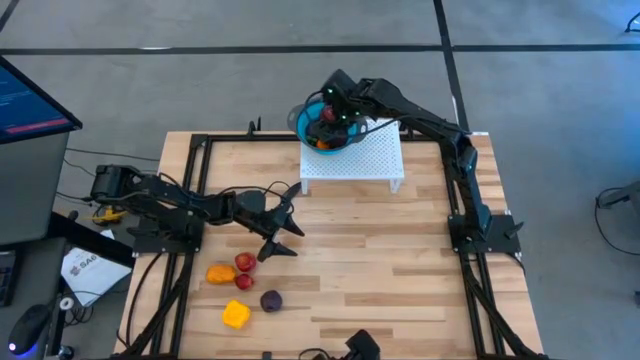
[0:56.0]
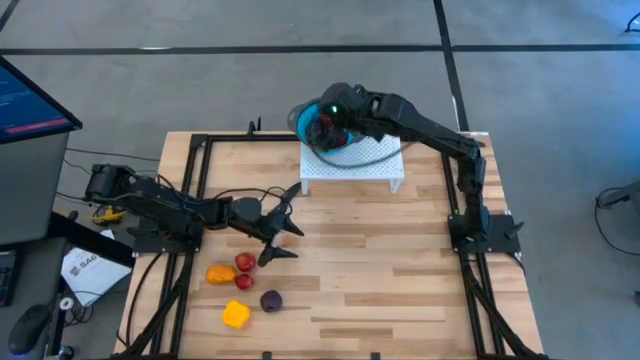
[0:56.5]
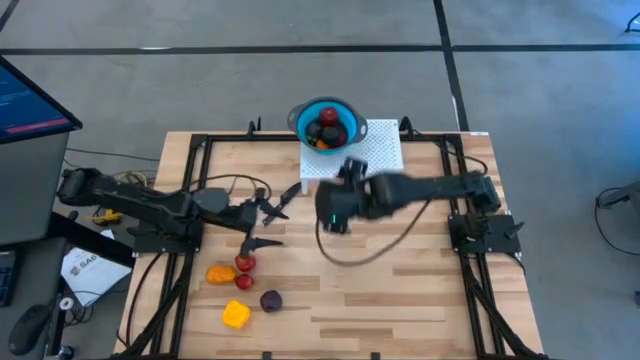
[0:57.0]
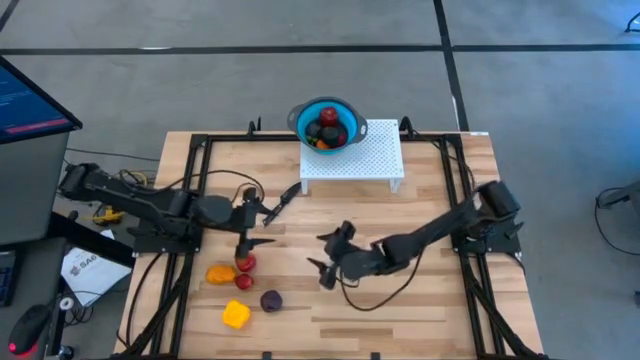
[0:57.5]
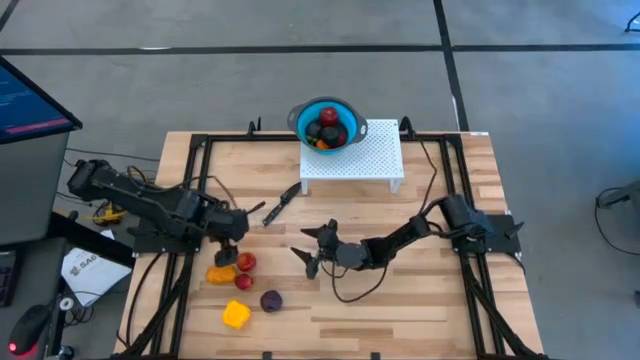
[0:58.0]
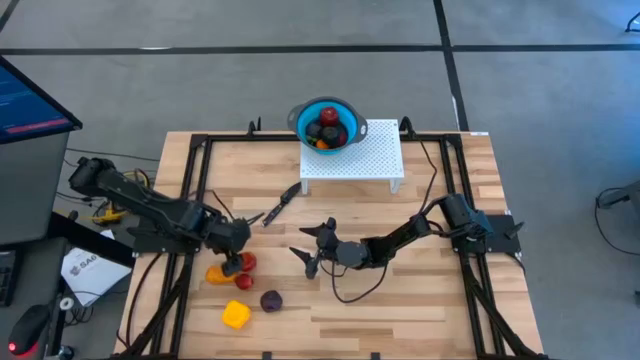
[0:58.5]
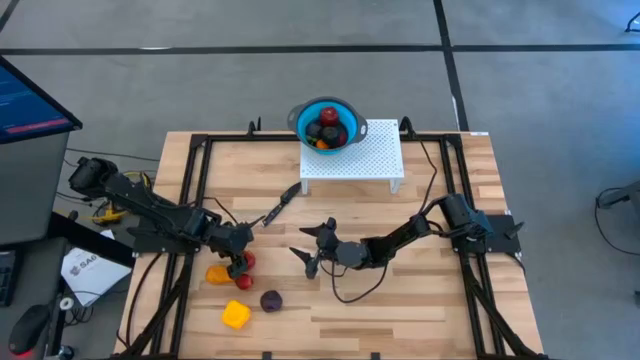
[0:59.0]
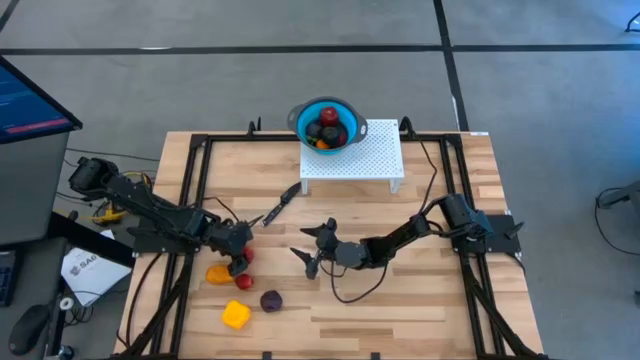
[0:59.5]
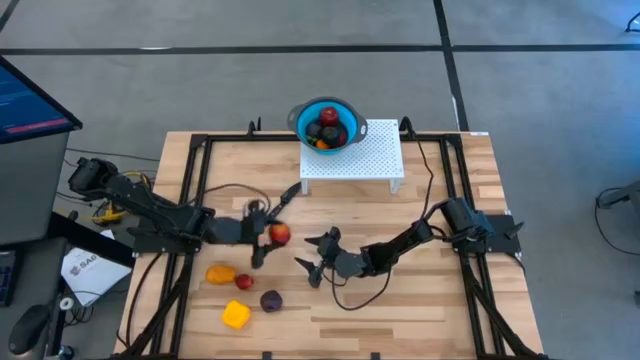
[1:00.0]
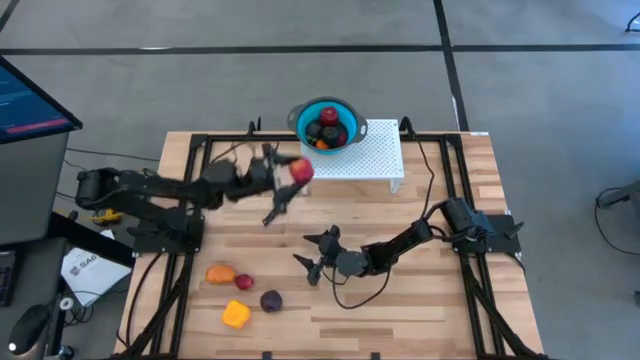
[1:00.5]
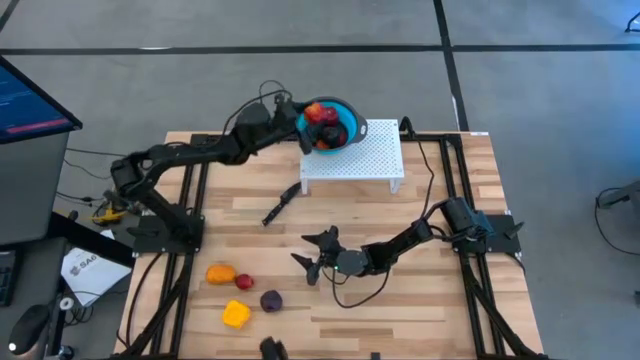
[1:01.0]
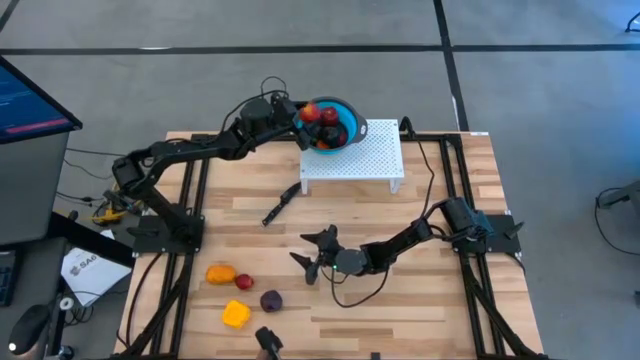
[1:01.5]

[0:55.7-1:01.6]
Task: Pick & Place Fruit
Put the red apple into the blue strainer bowl on the shelf

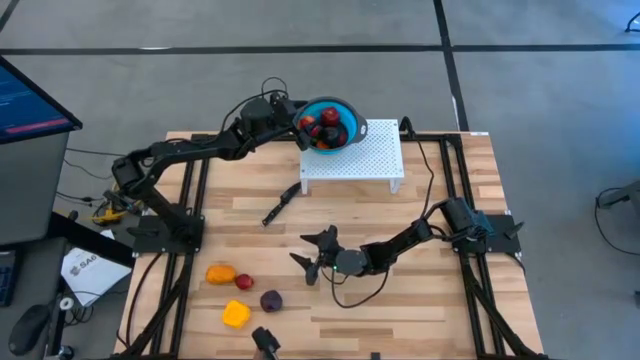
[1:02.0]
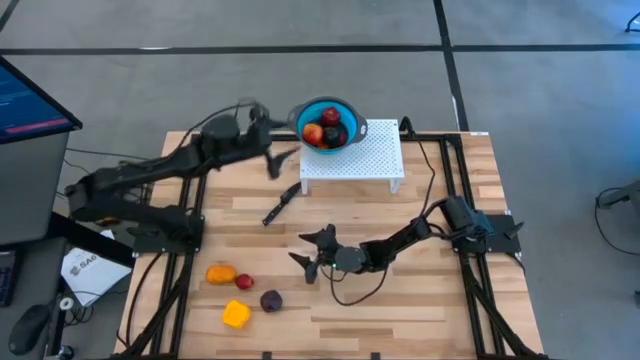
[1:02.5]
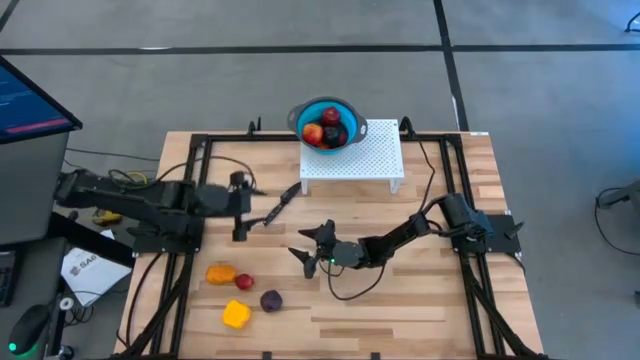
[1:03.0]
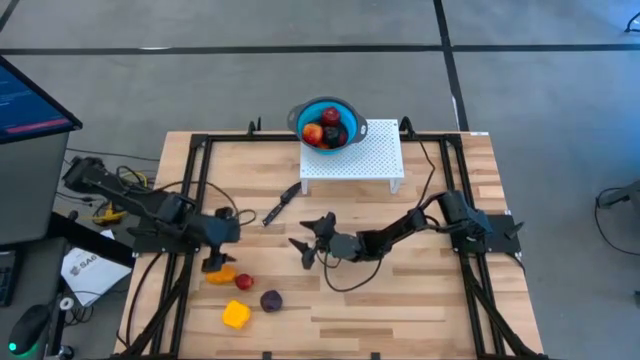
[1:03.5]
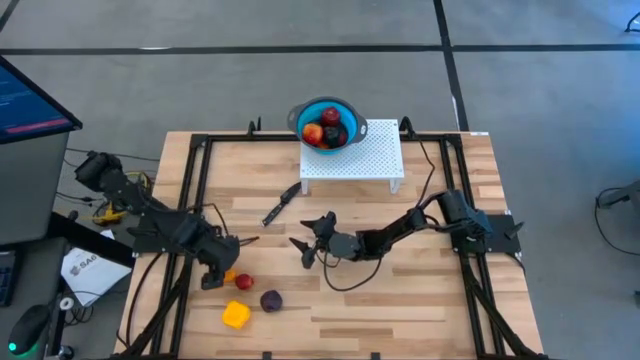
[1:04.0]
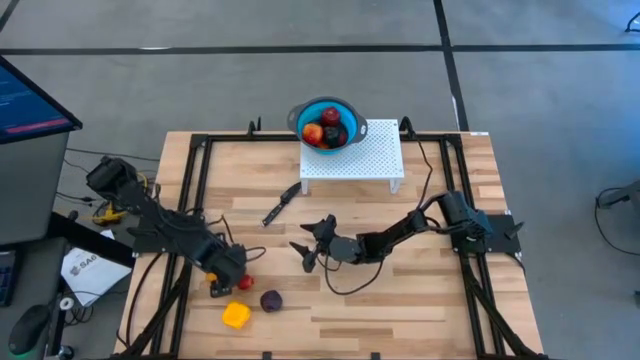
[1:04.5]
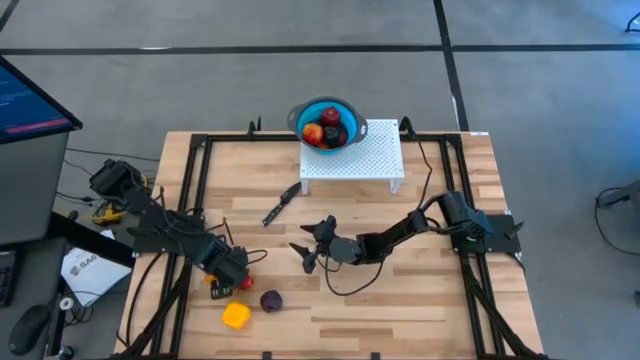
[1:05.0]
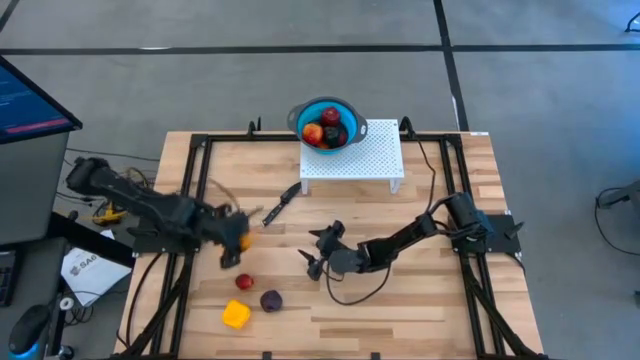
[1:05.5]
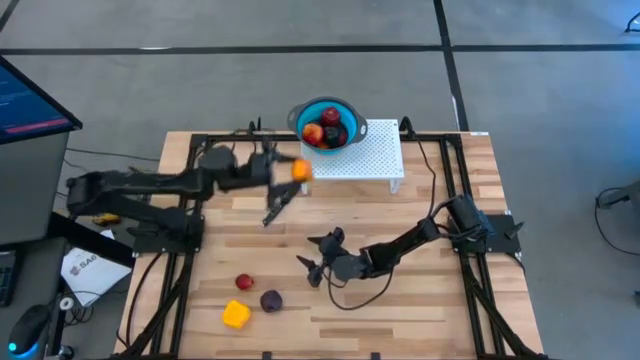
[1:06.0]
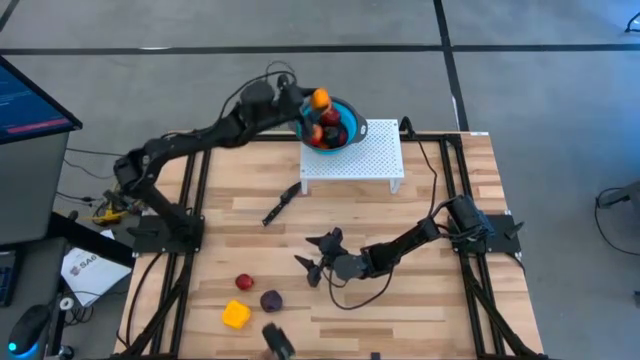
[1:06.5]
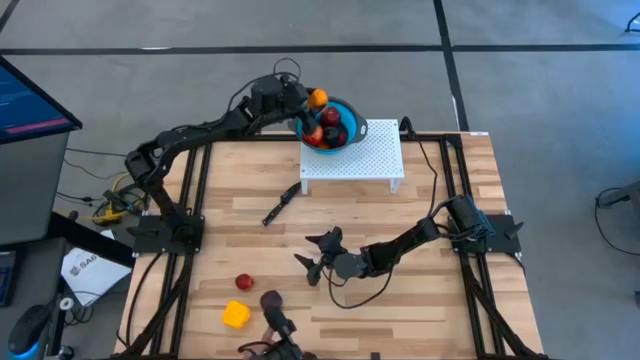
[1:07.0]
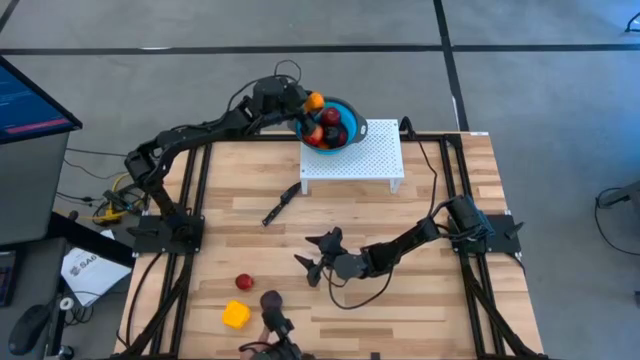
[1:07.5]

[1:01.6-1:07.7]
Put the yellow mango into the blue strainer bowl on the shelf

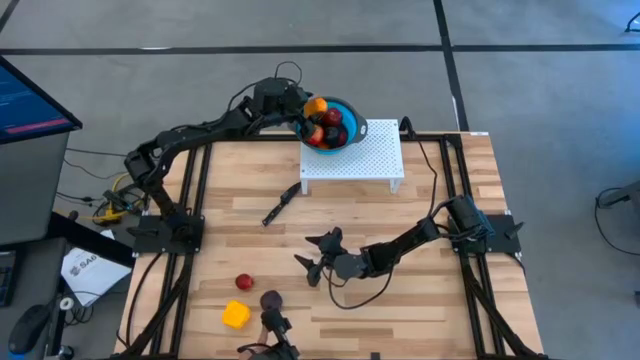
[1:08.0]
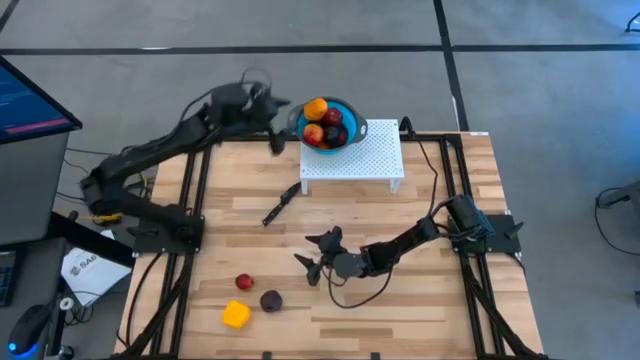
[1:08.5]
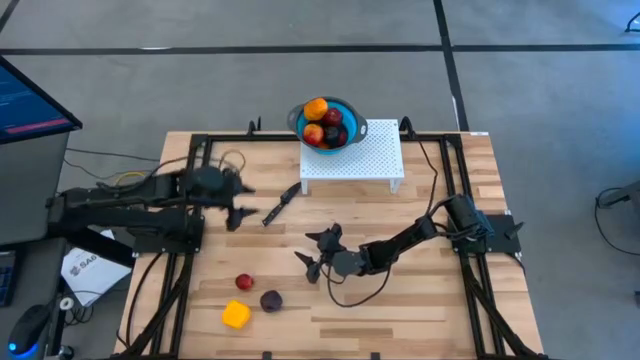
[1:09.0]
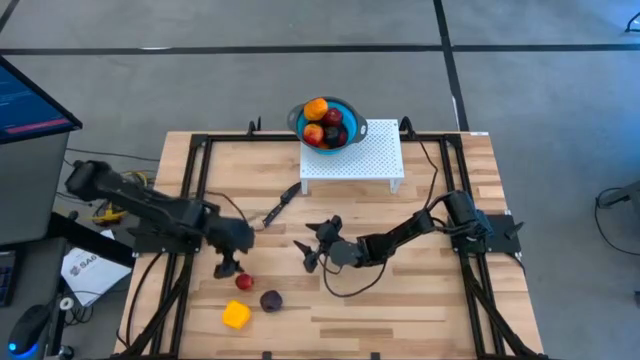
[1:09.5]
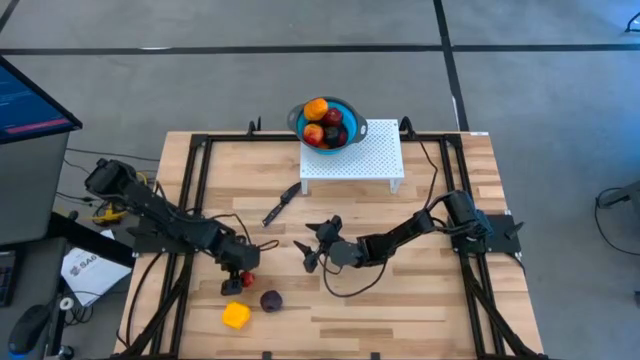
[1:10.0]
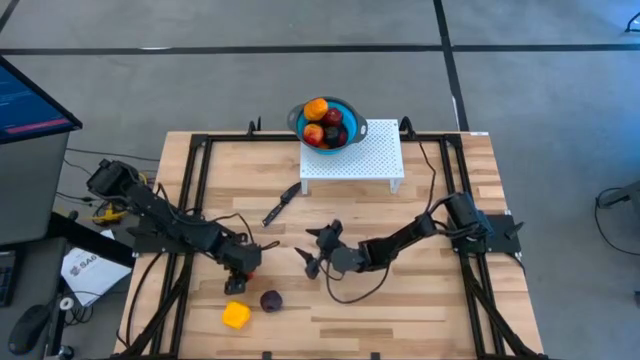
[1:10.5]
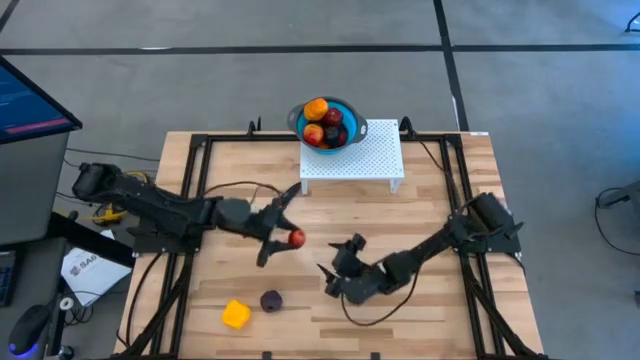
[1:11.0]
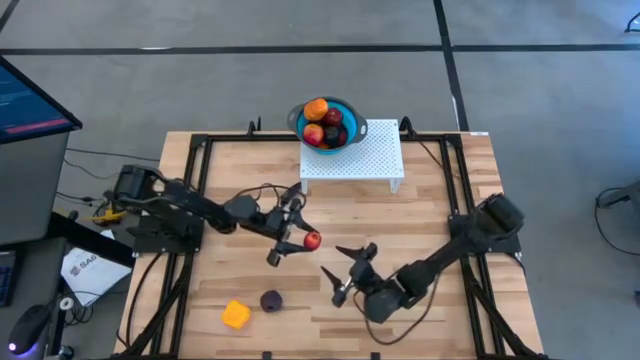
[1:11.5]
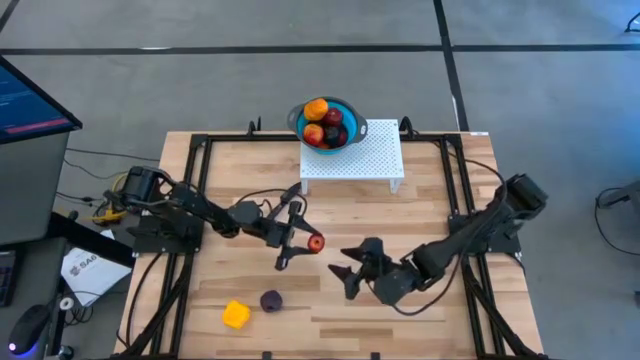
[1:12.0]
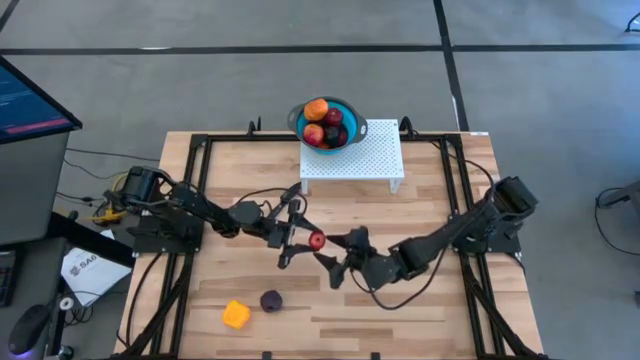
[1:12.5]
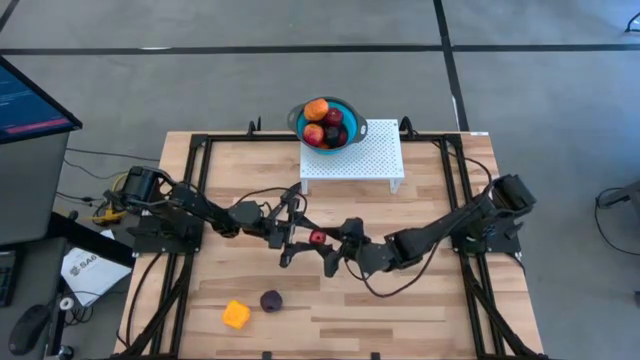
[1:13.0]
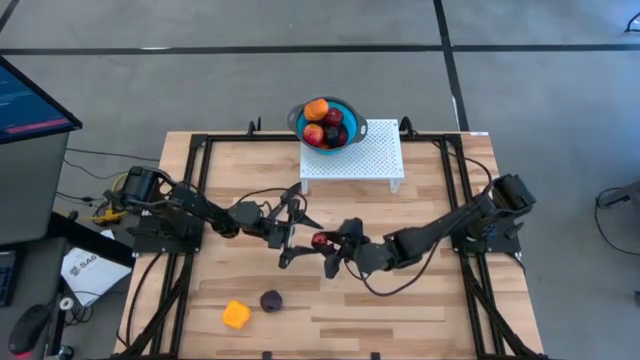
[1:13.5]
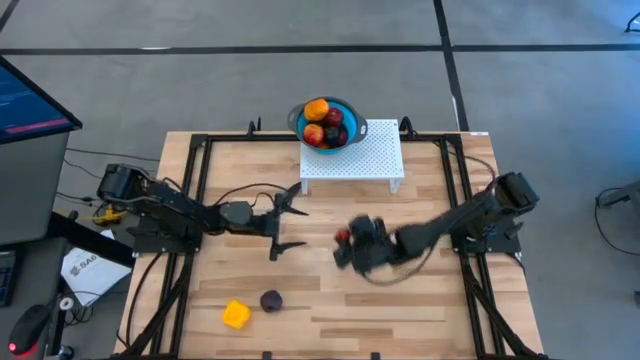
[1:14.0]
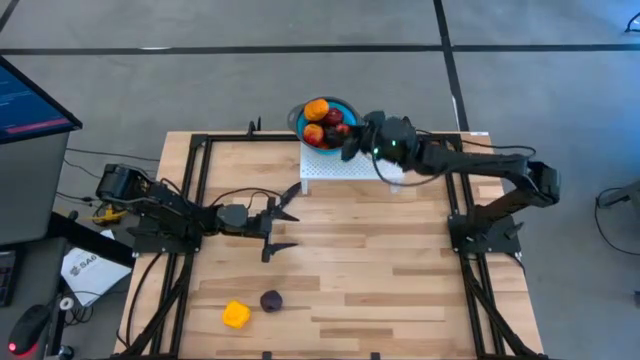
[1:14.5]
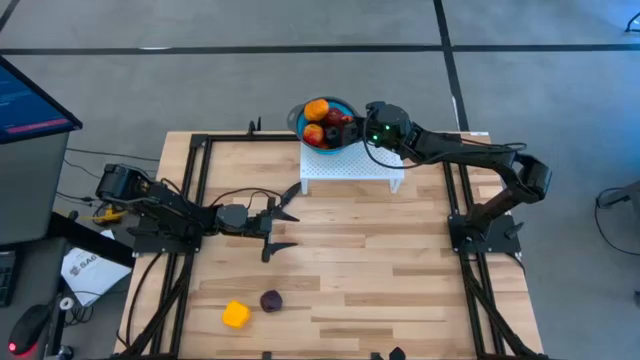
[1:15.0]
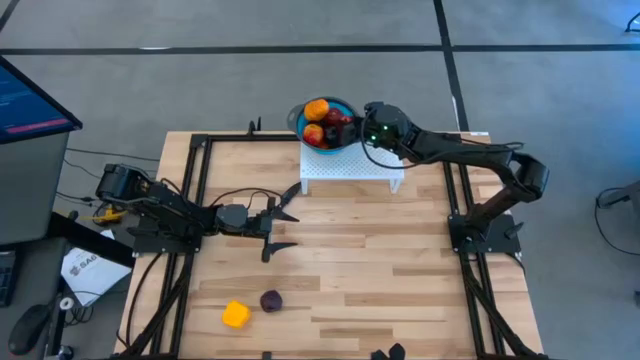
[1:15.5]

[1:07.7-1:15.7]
Put the red pomegranate into the blue strainer bowl on the shelf
